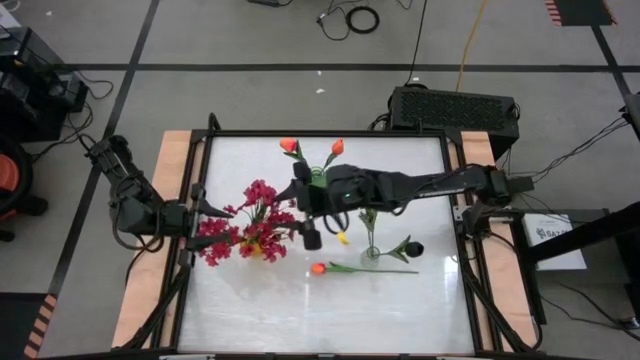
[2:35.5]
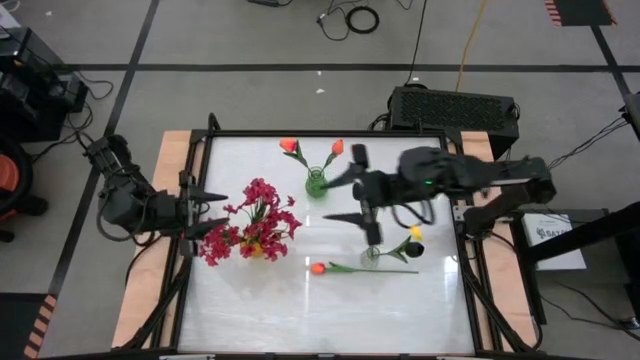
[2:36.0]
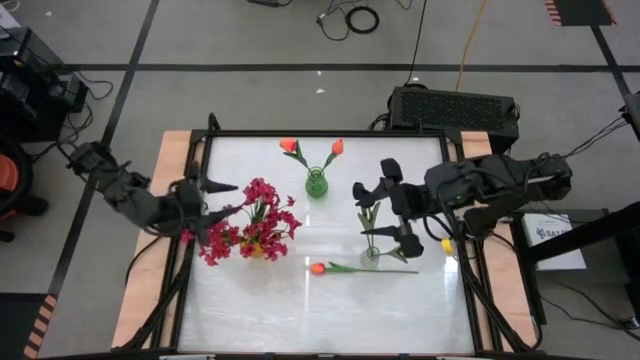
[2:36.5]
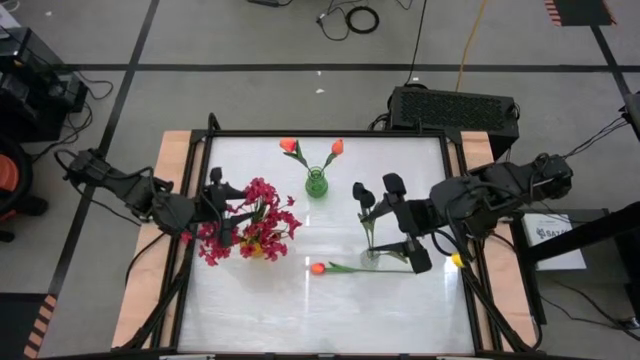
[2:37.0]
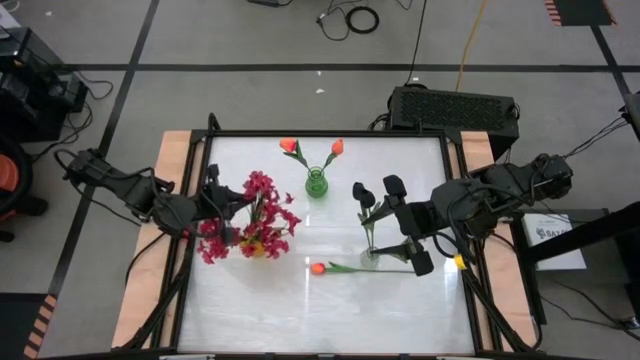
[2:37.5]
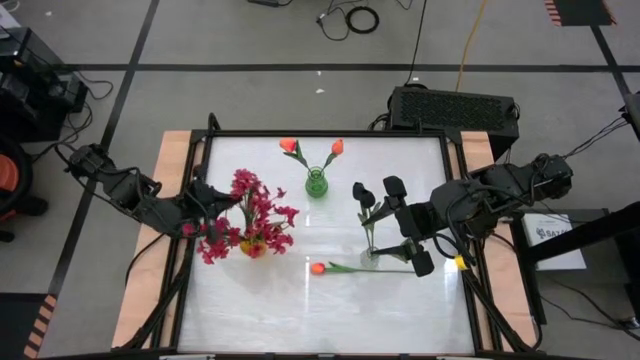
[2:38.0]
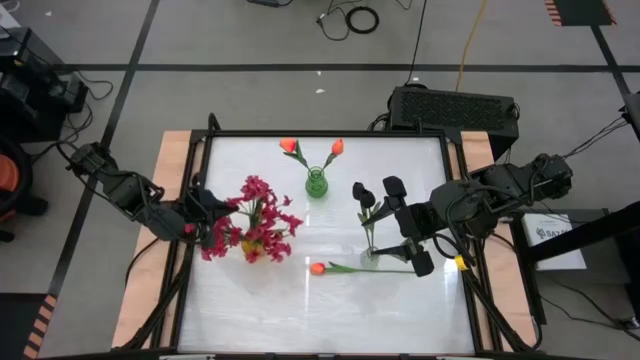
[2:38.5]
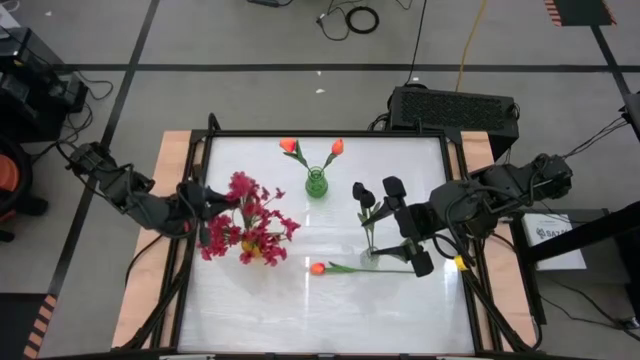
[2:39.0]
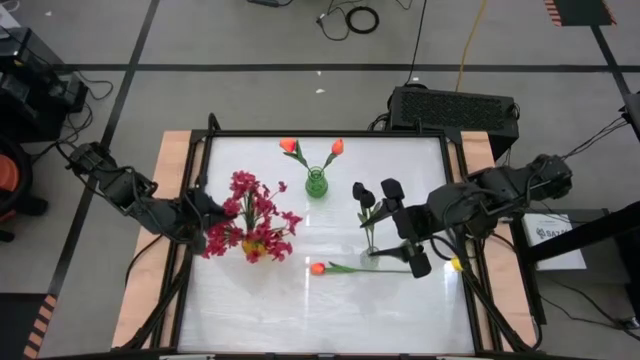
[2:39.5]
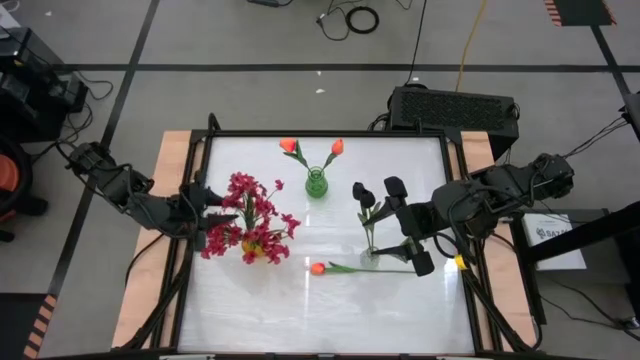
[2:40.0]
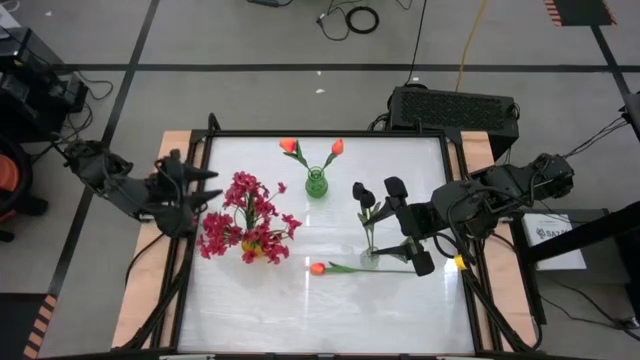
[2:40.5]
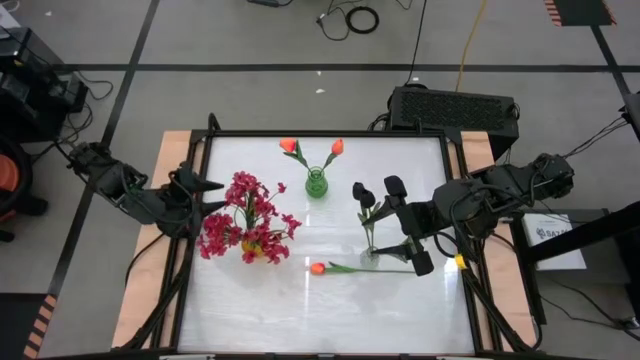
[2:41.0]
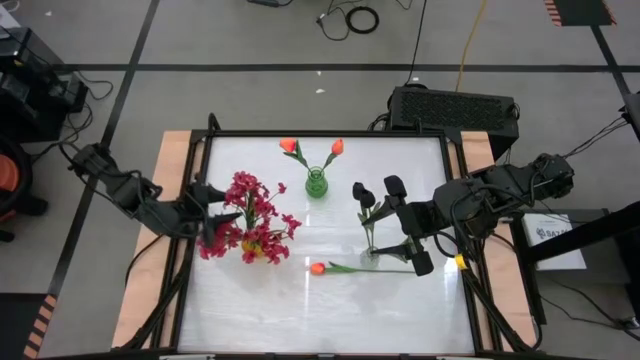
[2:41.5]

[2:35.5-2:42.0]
Task: Sort flowers into vase by color
Adjust the red flowers in the yellow vase

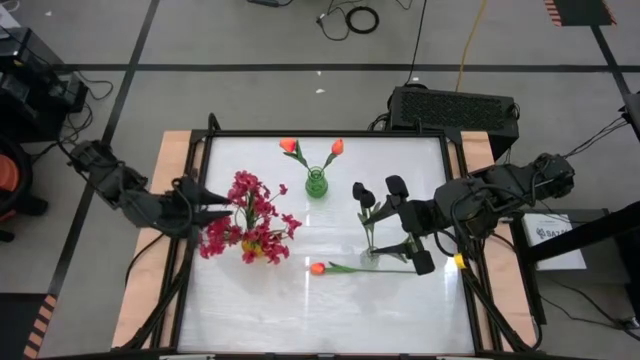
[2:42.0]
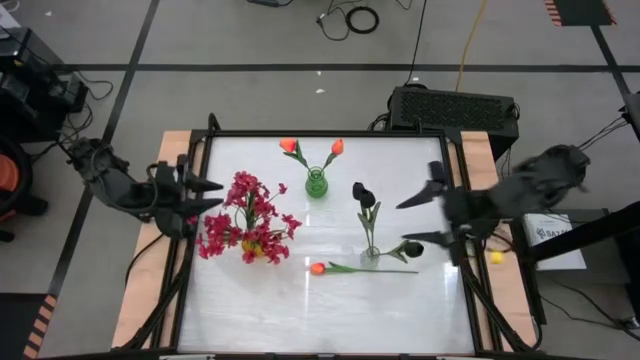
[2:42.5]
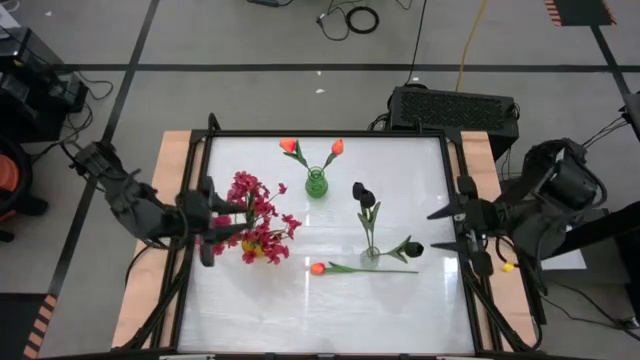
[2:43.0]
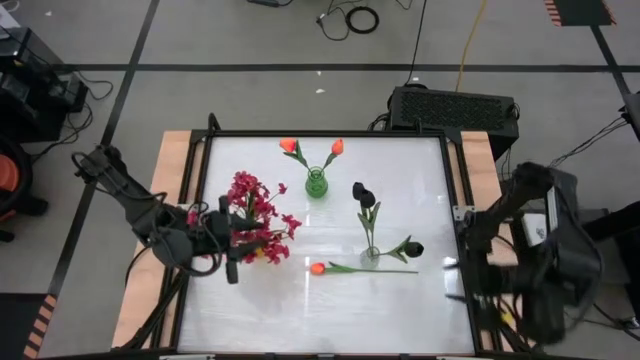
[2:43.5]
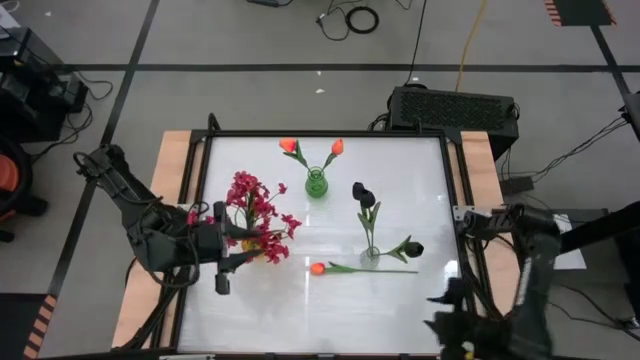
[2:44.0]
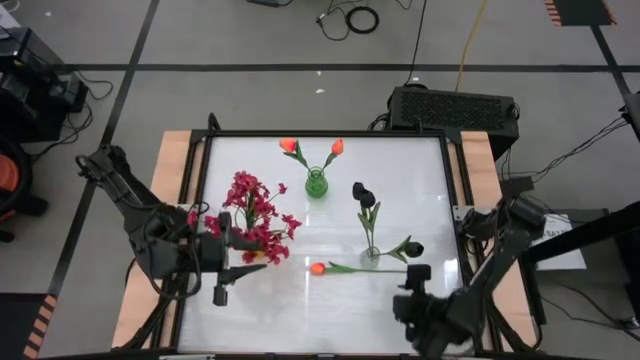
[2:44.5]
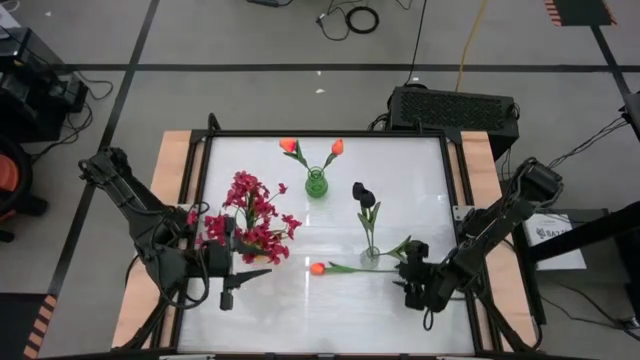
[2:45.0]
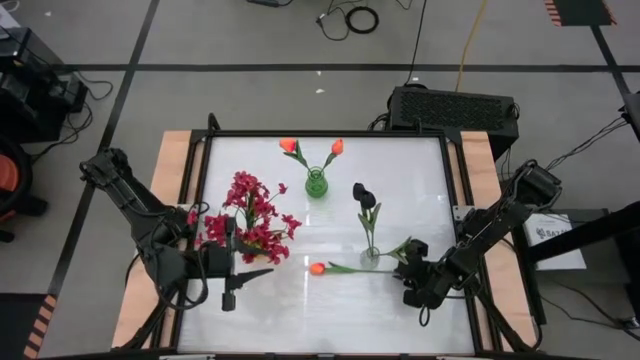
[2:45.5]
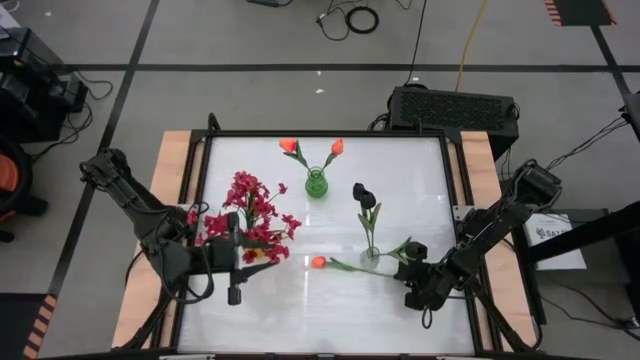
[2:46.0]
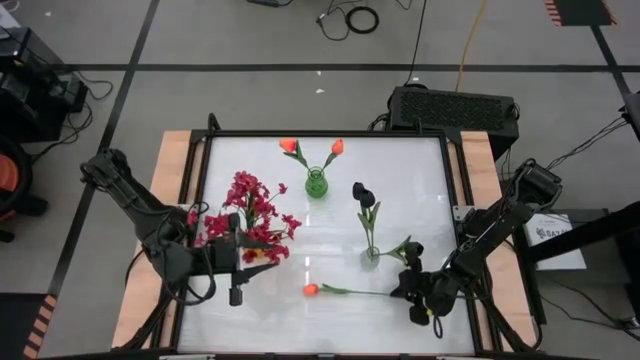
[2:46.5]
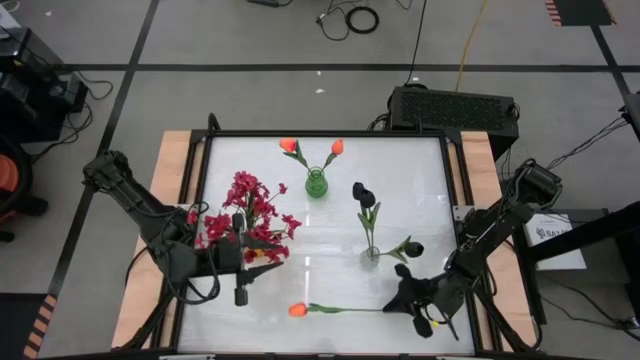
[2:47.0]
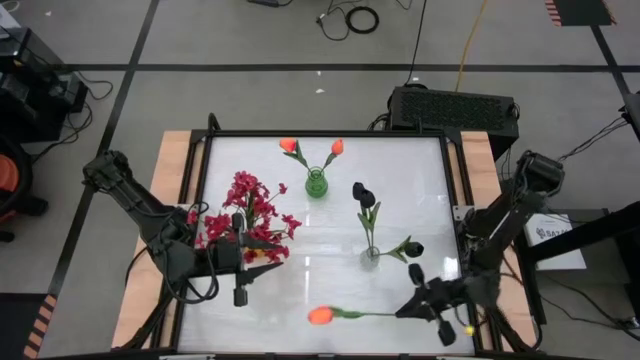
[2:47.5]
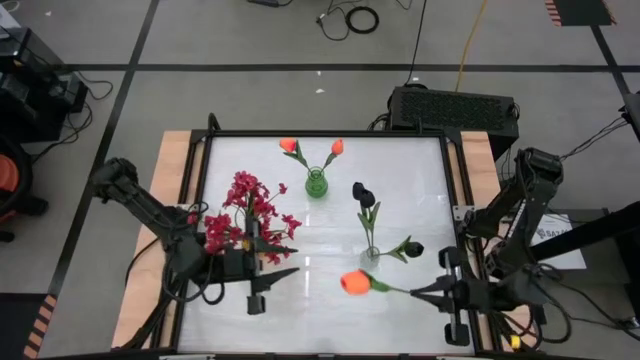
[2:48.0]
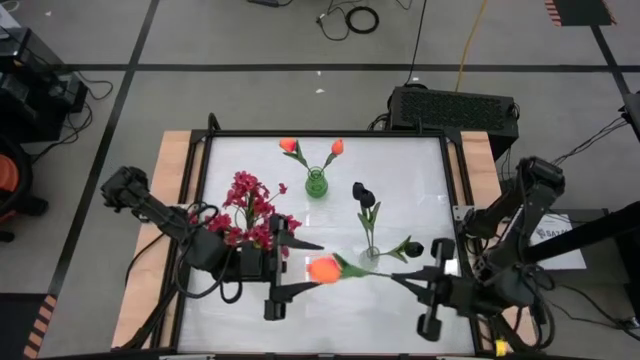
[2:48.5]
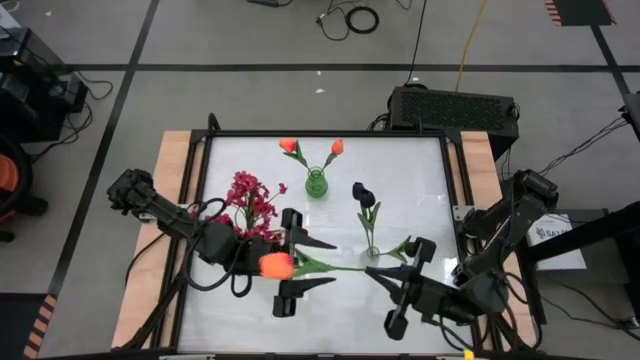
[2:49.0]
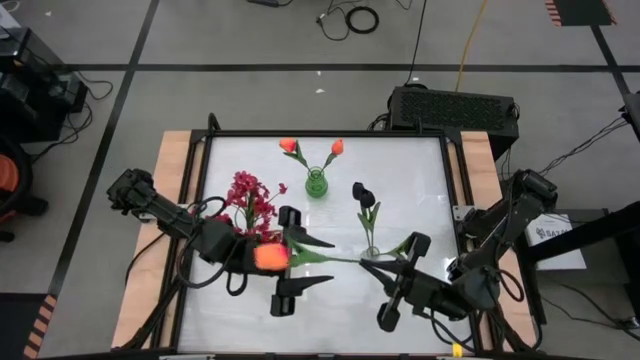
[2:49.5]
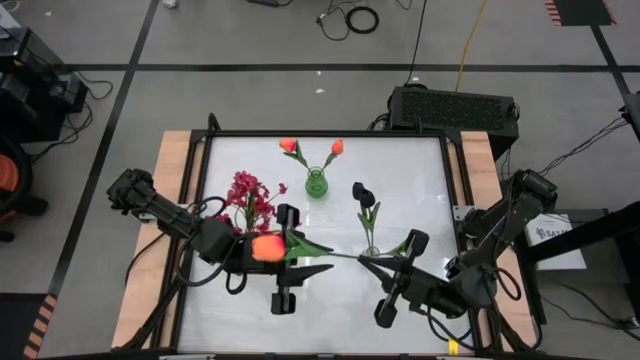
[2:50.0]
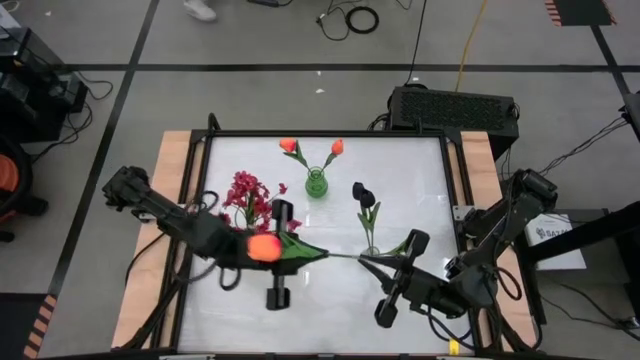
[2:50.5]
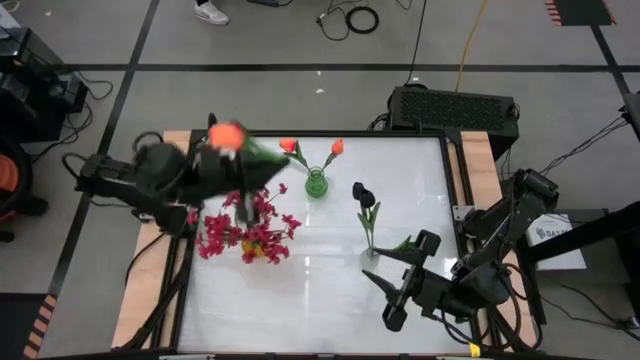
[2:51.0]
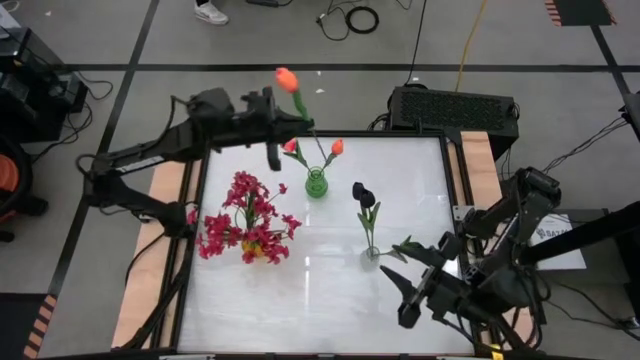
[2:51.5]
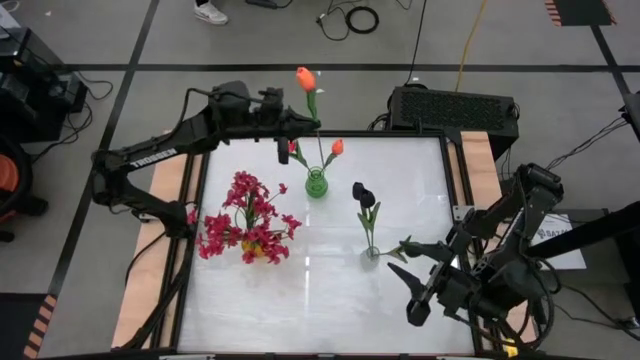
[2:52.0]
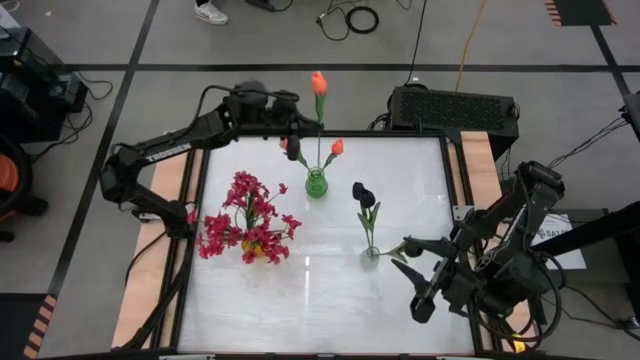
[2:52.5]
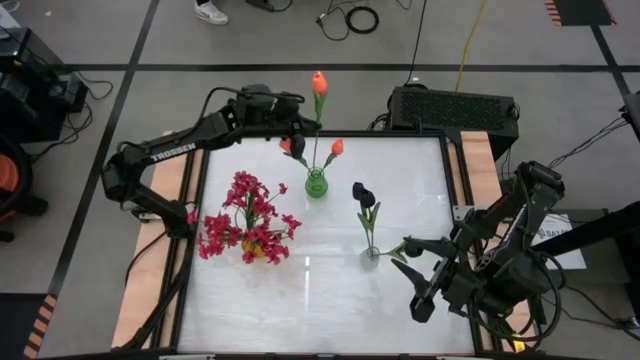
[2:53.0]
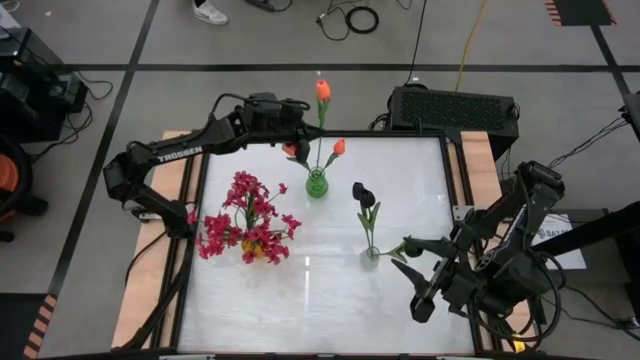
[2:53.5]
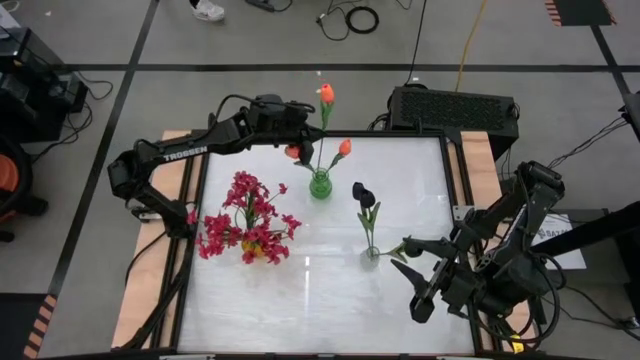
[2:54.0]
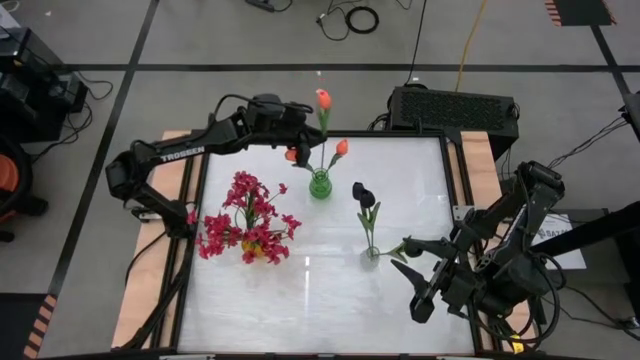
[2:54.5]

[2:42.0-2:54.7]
Put the orange flower into the green vase

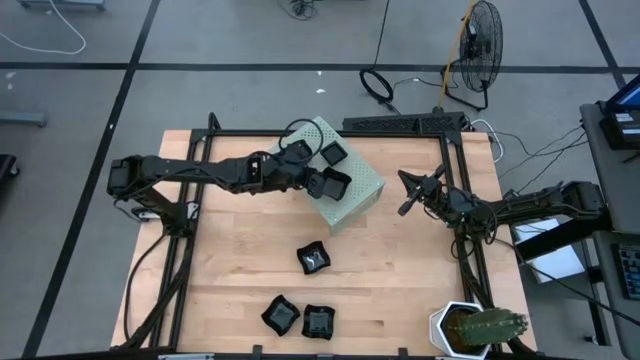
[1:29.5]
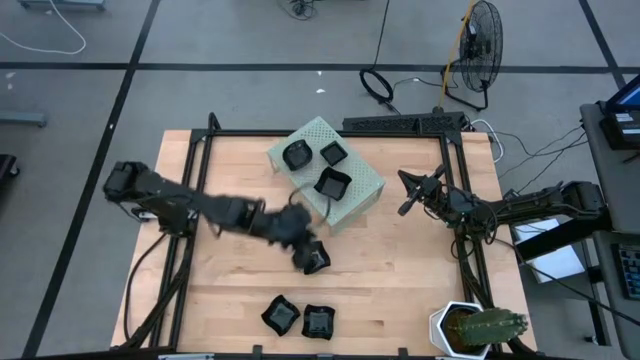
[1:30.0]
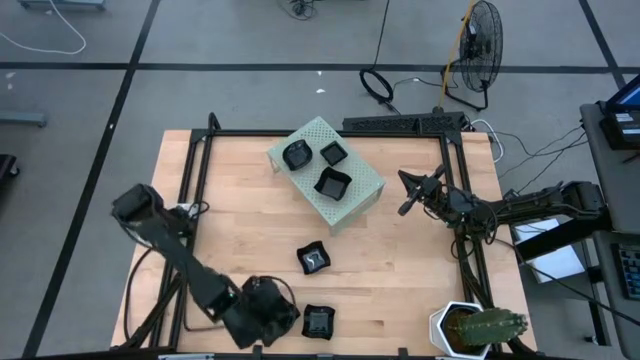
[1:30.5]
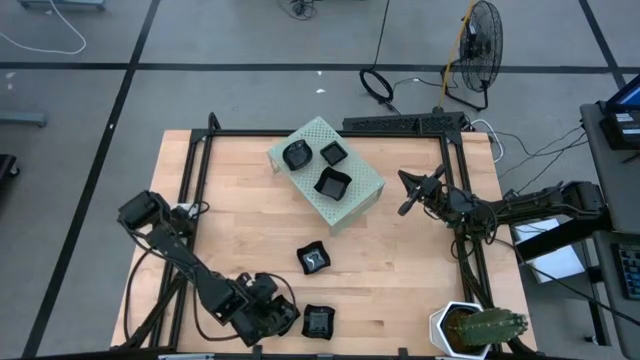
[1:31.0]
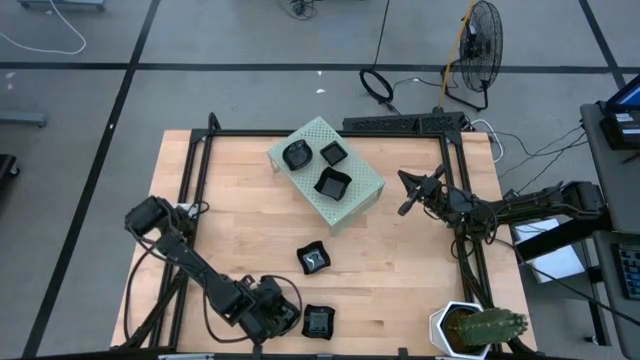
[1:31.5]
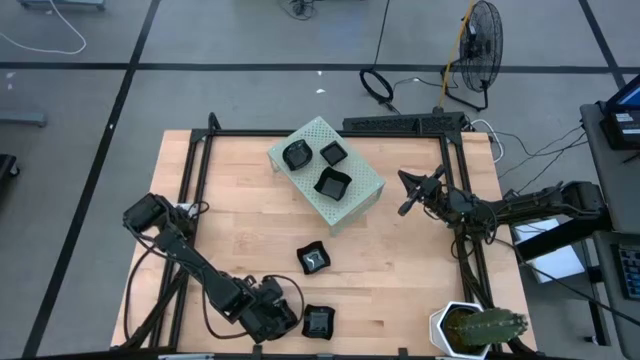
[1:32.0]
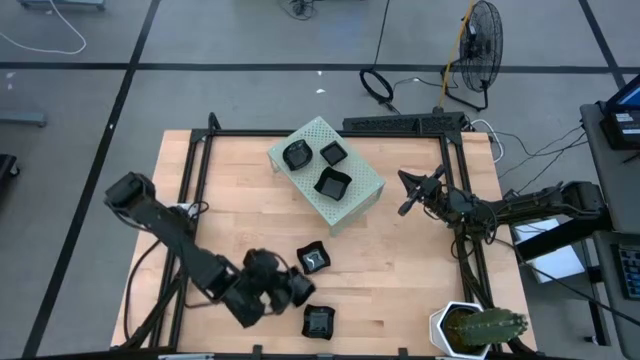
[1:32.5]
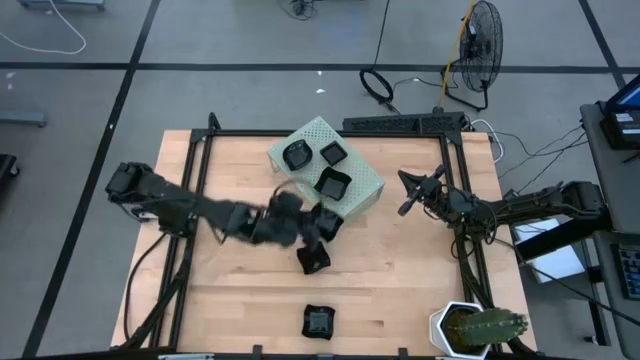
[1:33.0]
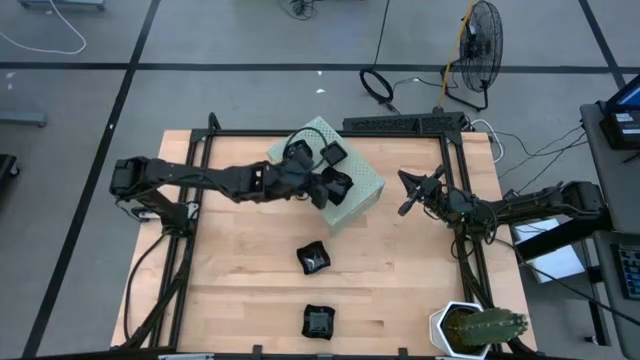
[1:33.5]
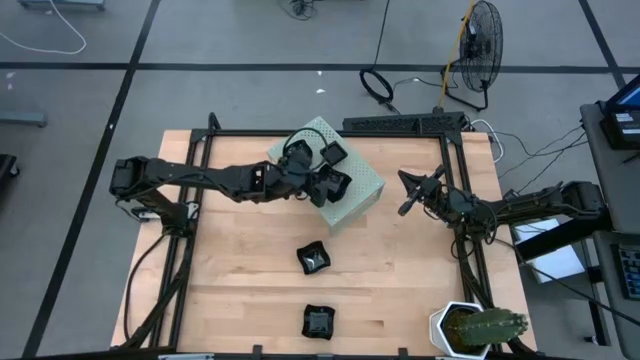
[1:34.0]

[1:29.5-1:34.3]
Task: Pick & Place Mini shaped plates
Stack the distorted square plate on top of the other distorted square plate on the shelf
